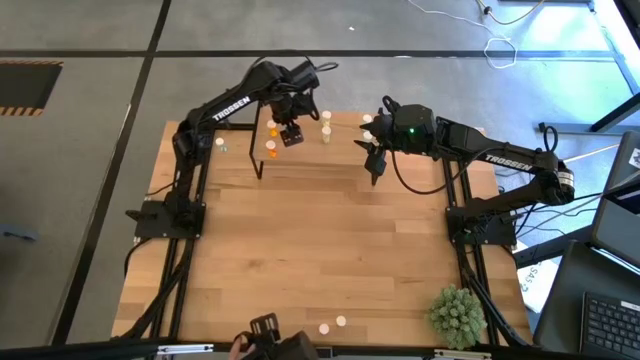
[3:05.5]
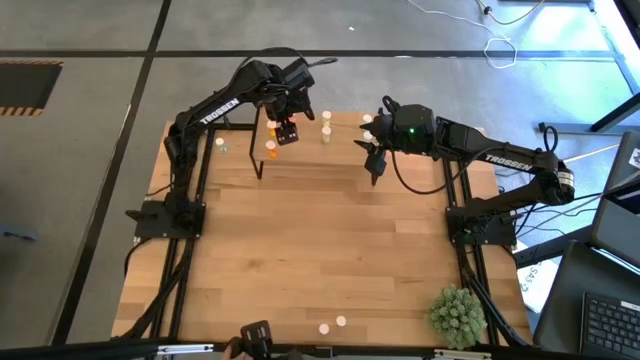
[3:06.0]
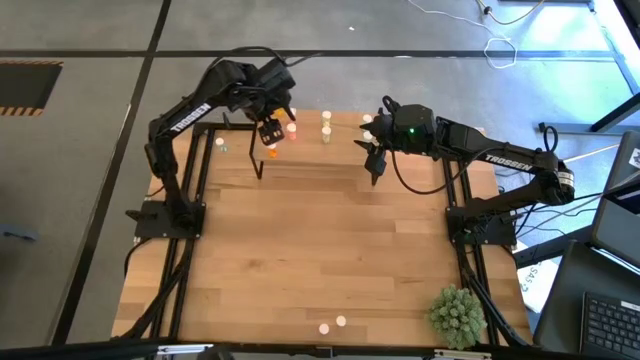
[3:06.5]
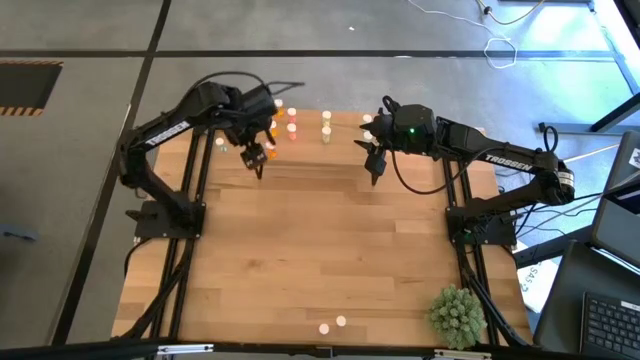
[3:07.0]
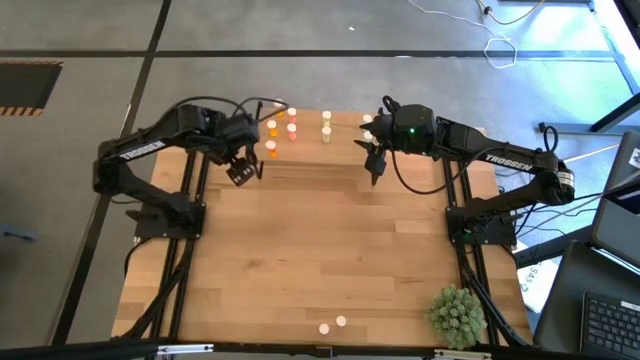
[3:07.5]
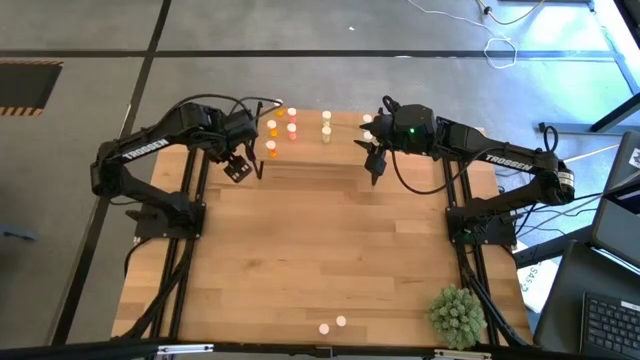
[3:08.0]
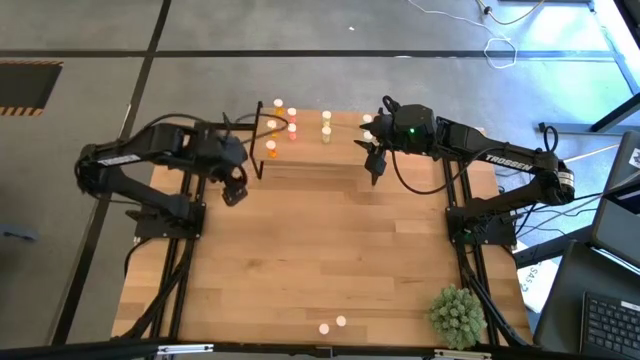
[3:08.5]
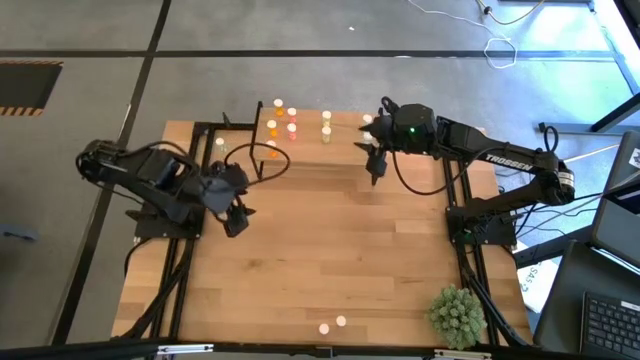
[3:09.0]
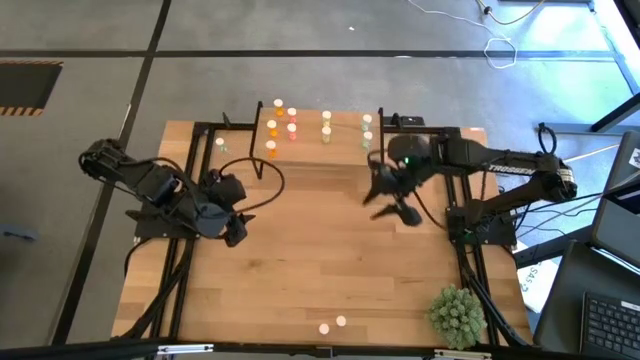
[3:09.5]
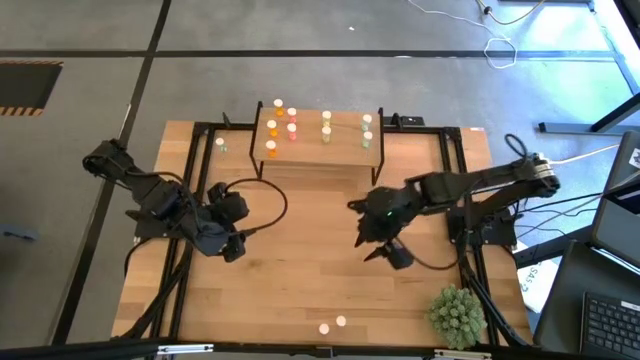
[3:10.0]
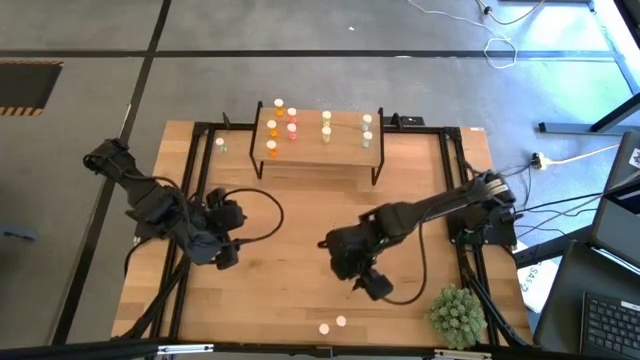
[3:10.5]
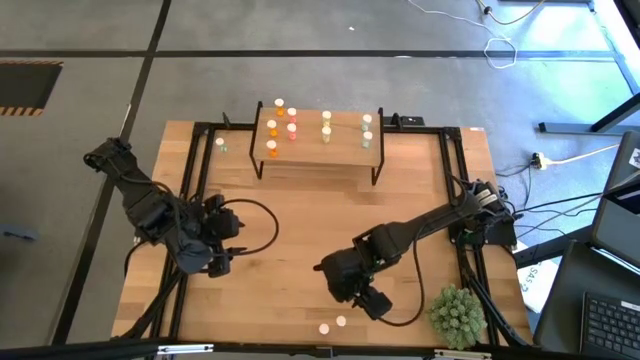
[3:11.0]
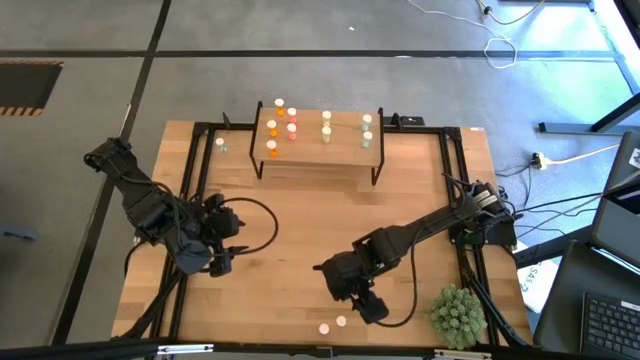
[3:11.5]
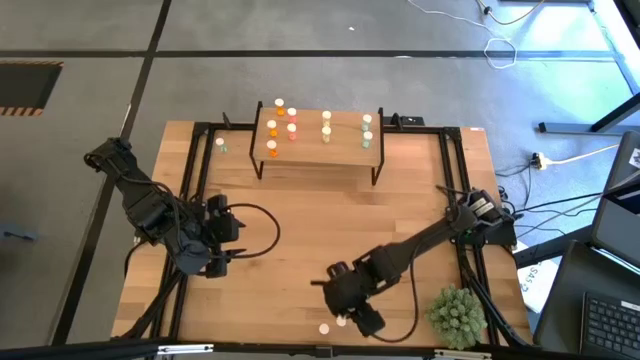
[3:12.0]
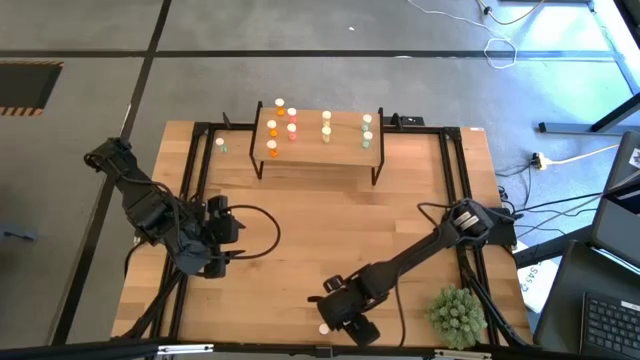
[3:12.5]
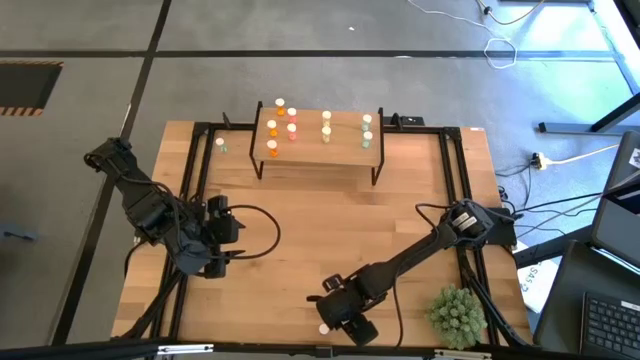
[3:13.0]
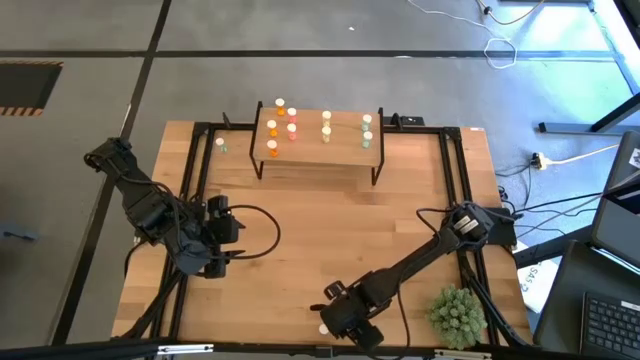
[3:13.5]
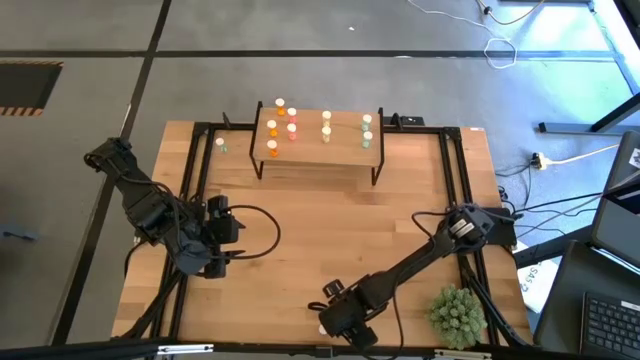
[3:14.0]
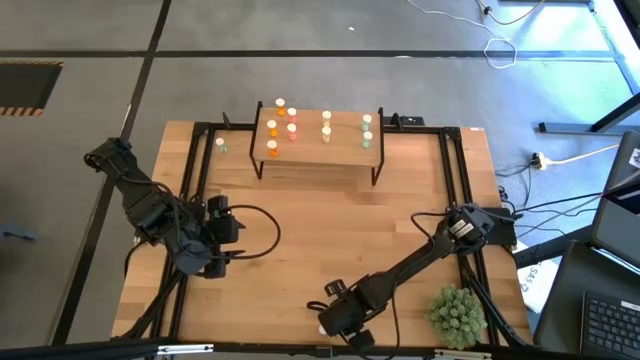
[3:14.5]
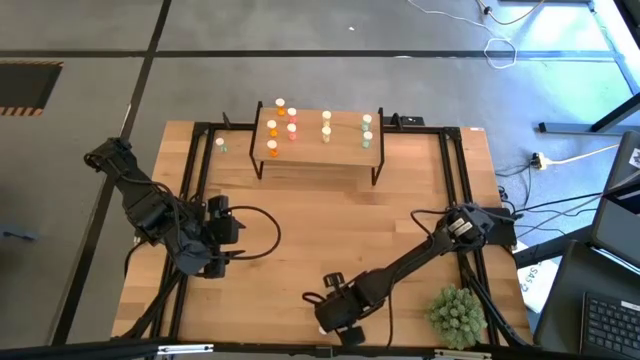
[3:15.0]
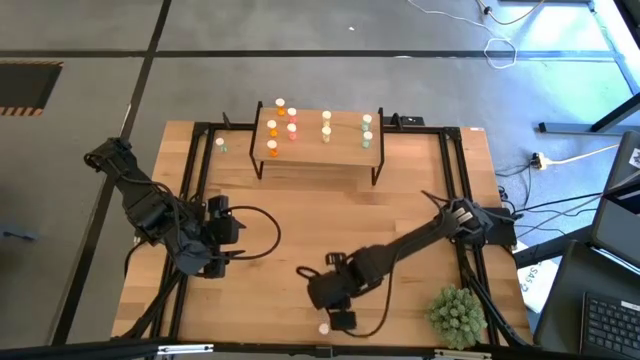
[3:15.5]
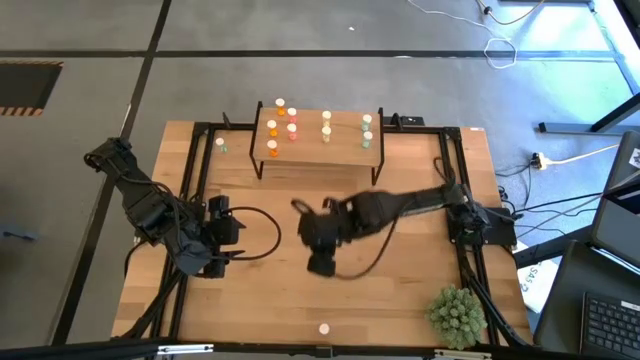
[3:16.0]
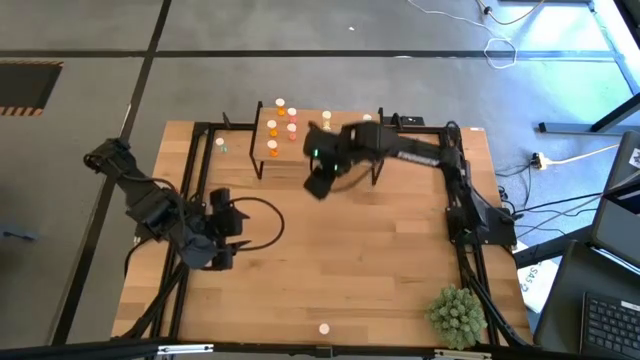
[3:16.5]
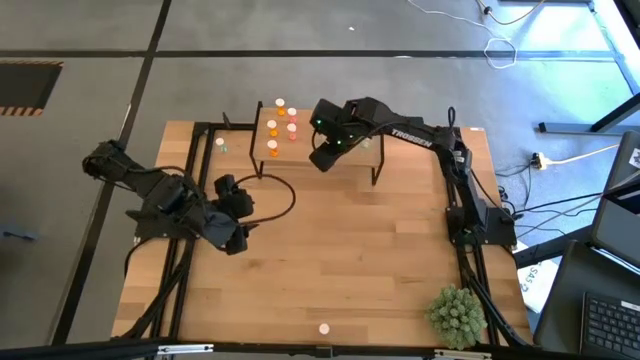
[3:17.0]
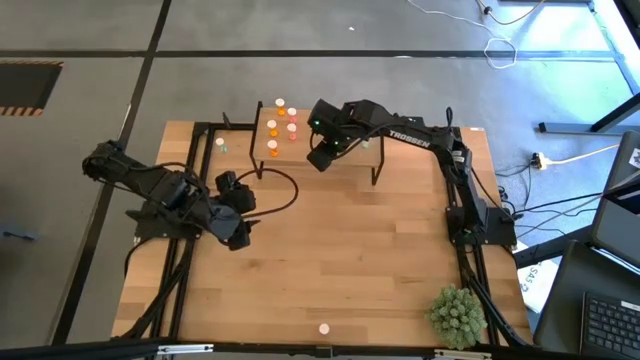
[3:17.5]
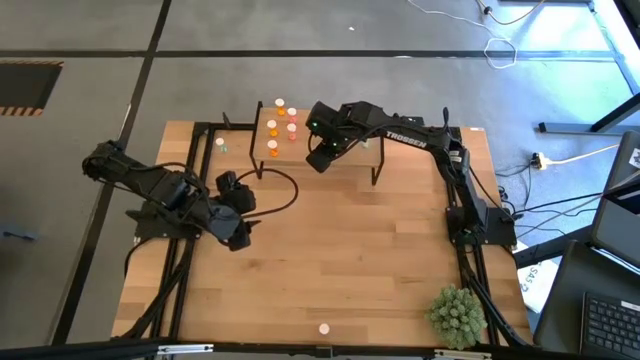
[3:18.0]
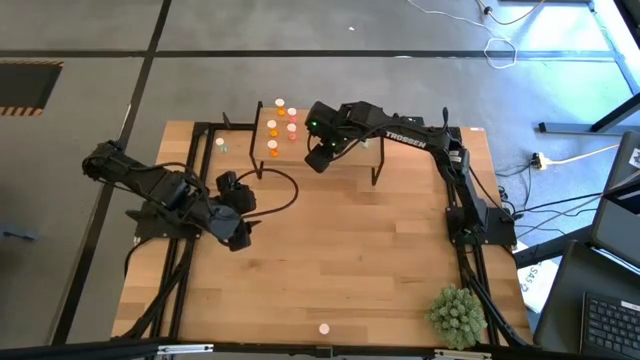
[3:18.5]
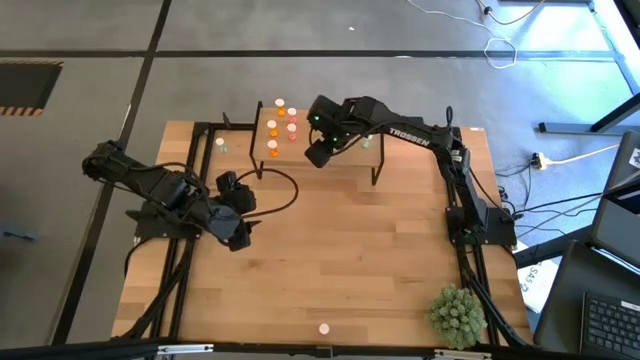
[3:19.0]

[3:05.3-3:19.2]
Task: Pick and place medicine bottles onto shelf by color
Put the yellow pill bottle on the shelf aligned with the other yellow pill bottles

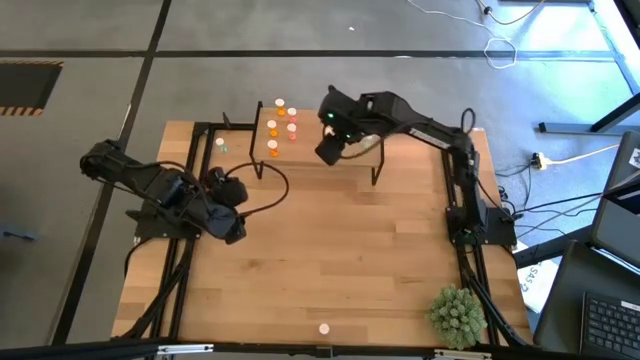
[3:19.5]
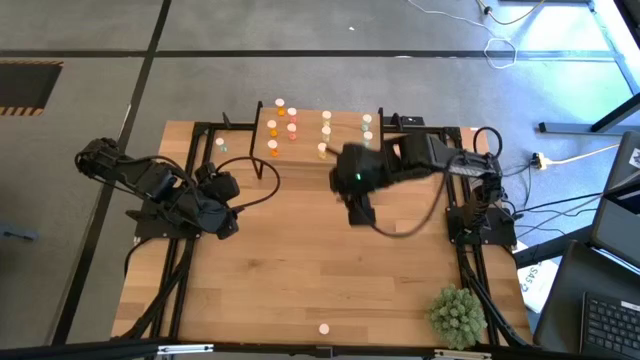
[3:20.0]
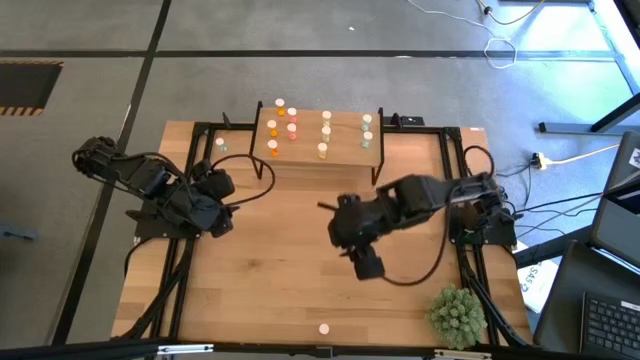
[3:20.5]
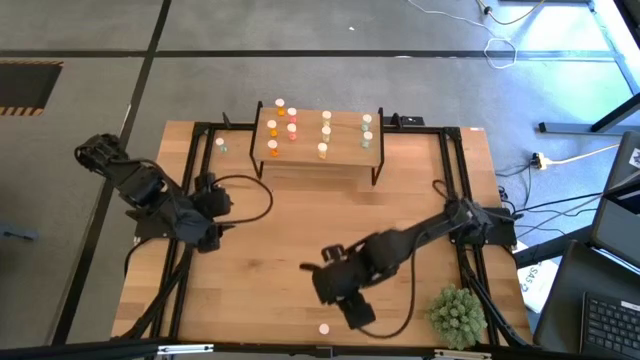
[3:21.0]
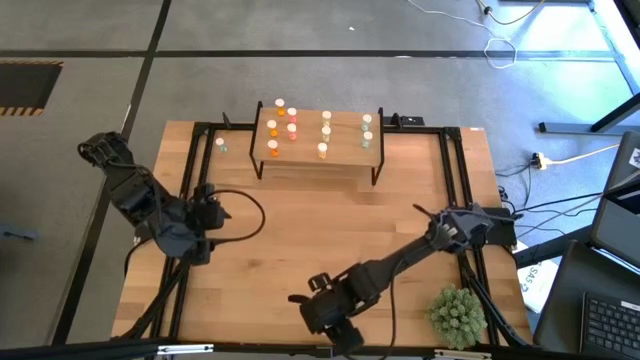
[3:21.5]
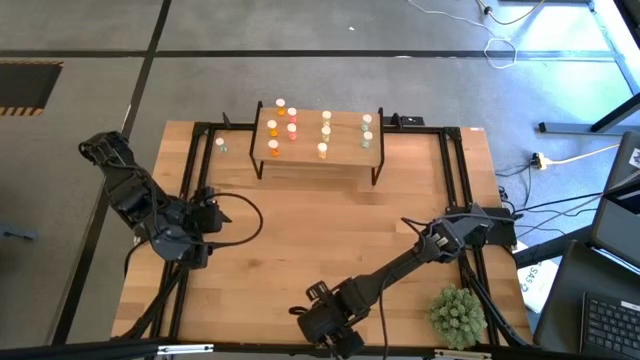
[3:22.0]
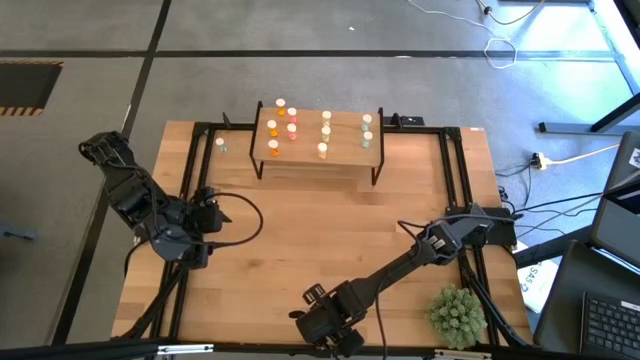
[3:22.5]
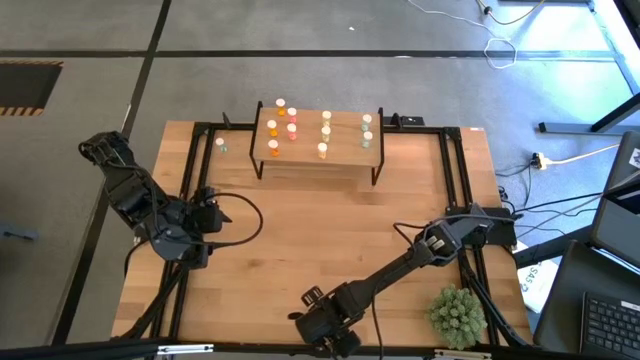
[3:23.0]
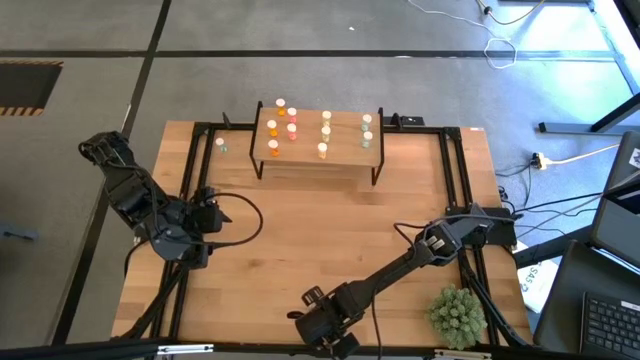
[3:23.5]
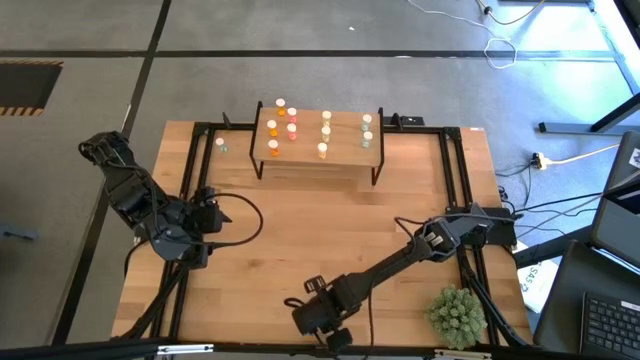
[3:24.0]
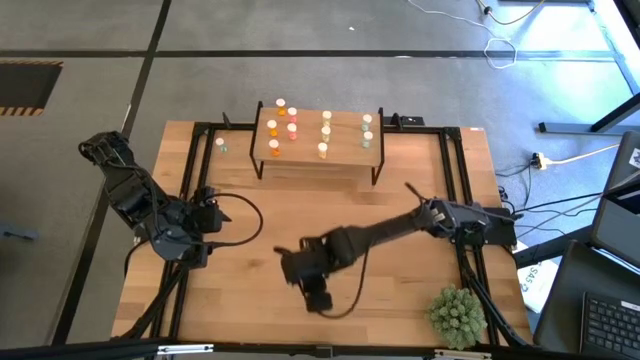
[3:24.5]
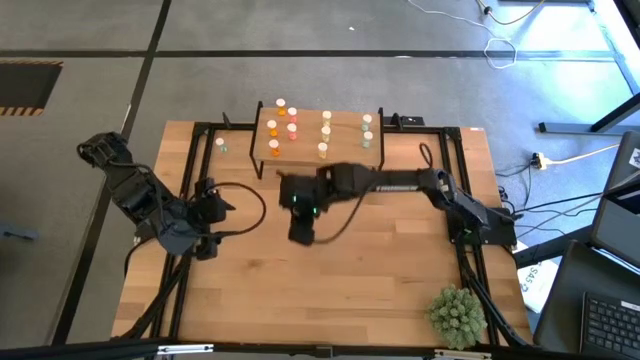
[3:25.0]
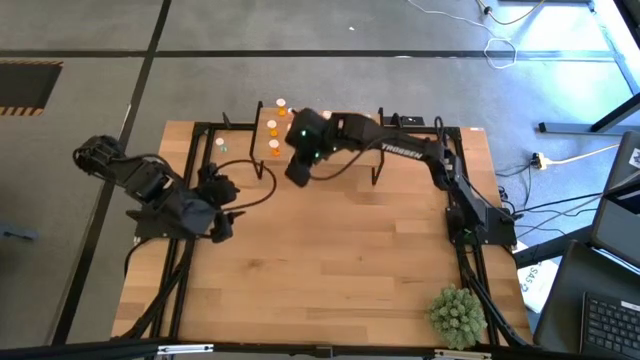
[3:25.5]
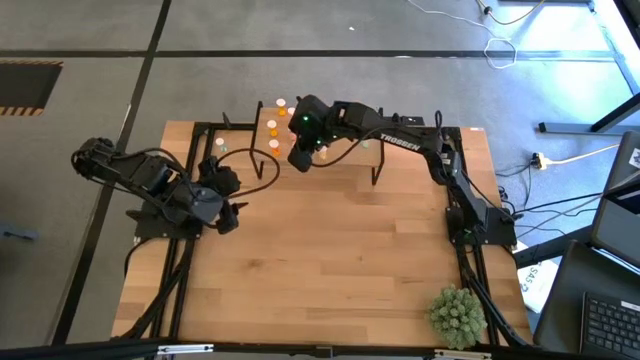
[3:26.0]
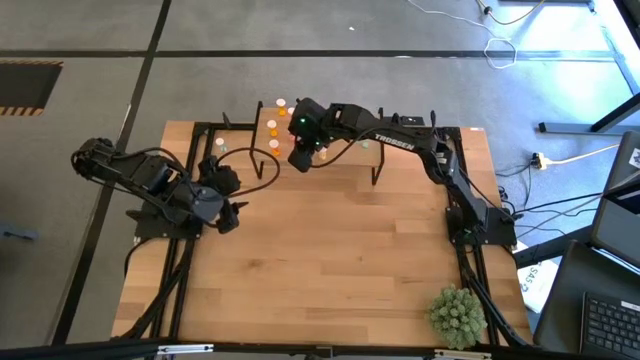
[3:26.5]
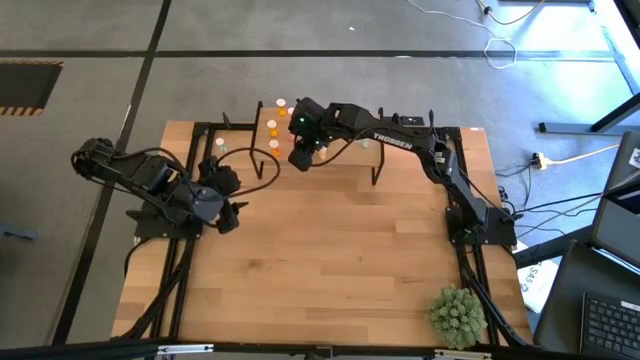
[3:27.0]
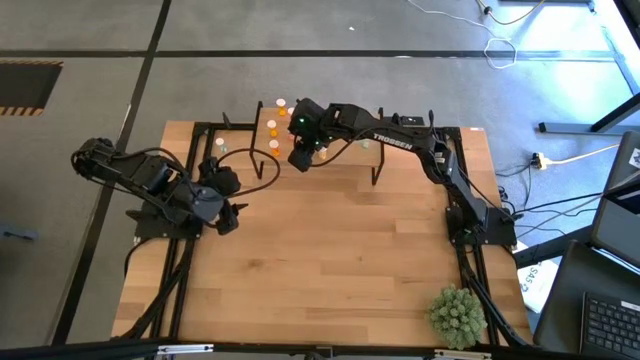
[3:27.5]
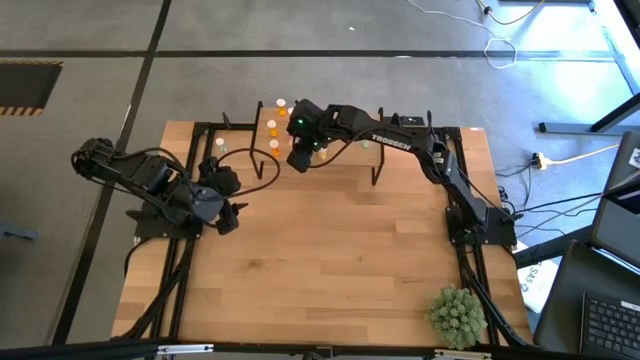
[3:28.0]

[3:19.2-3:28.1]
Put the pink pill bottle on the shelf aligned with the other pink pill bottles
